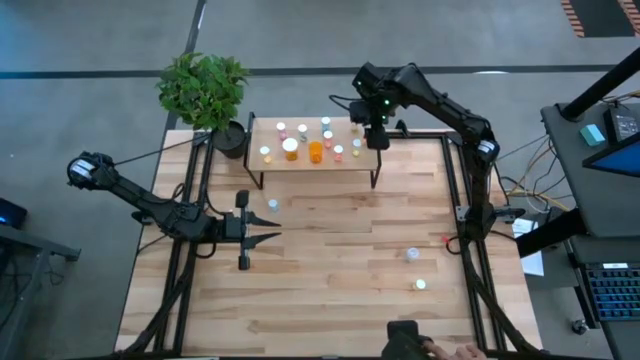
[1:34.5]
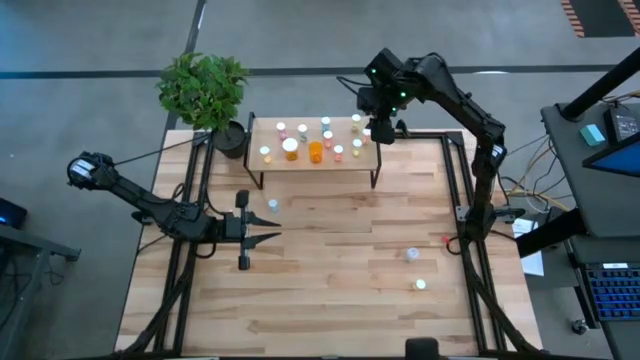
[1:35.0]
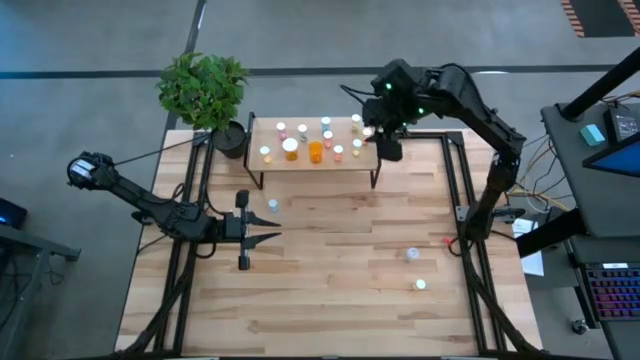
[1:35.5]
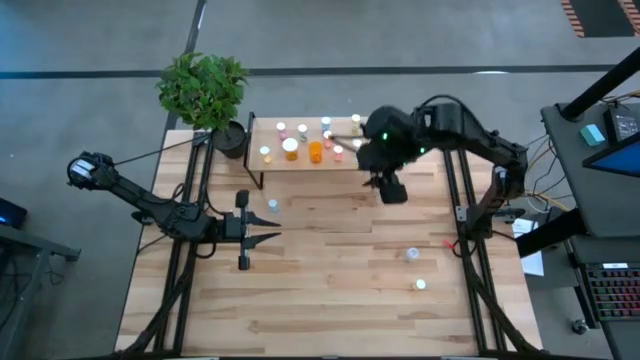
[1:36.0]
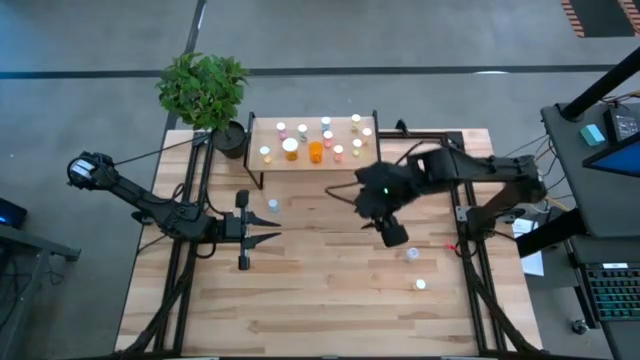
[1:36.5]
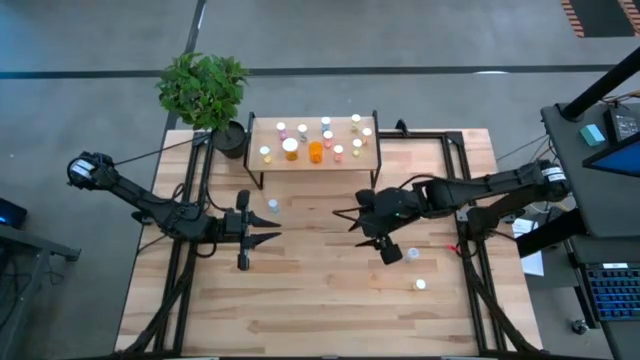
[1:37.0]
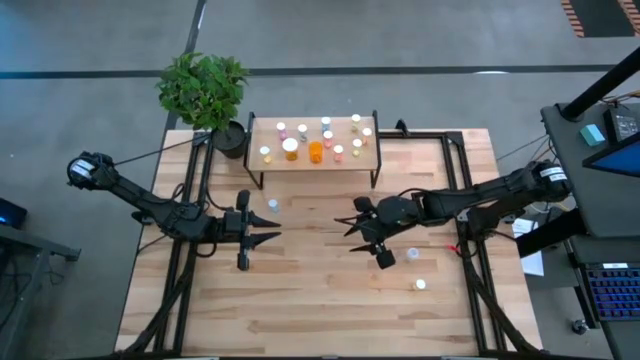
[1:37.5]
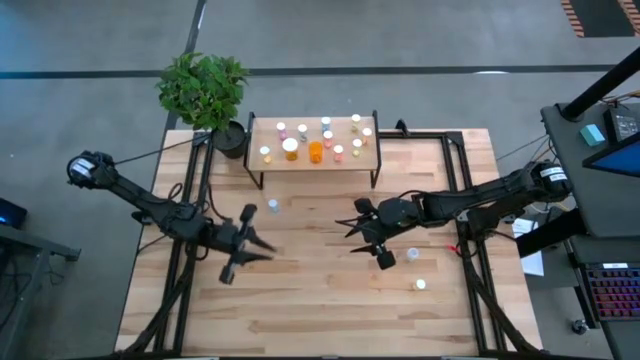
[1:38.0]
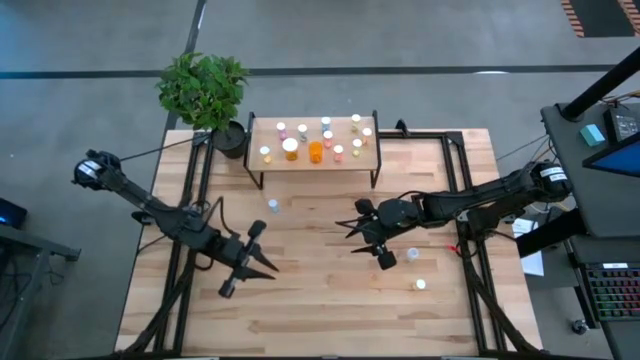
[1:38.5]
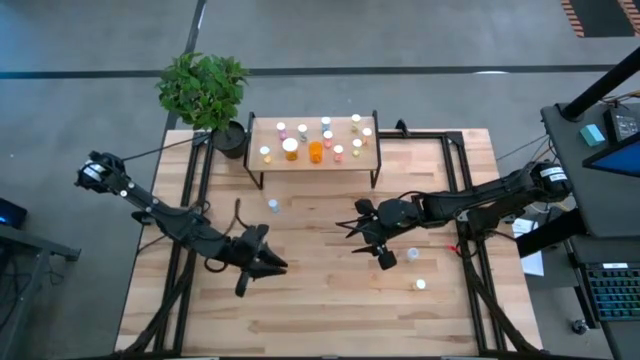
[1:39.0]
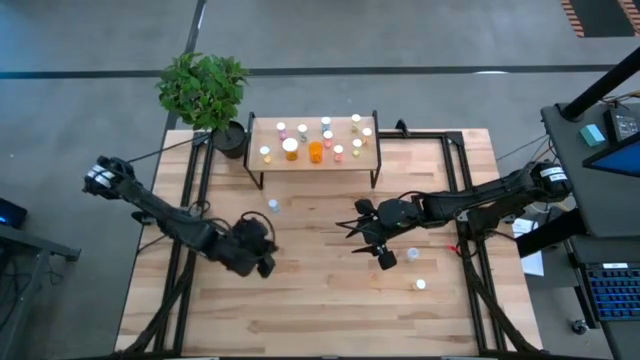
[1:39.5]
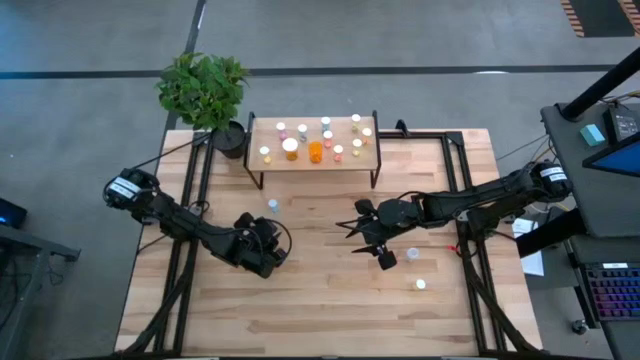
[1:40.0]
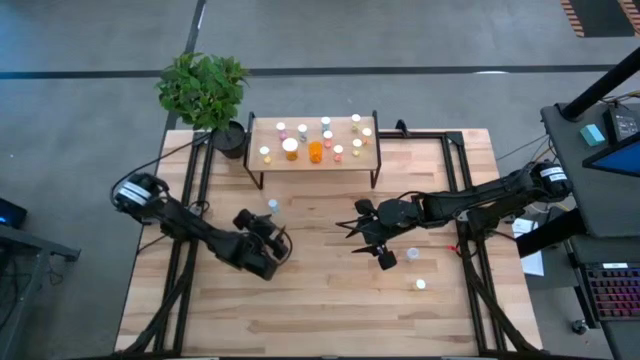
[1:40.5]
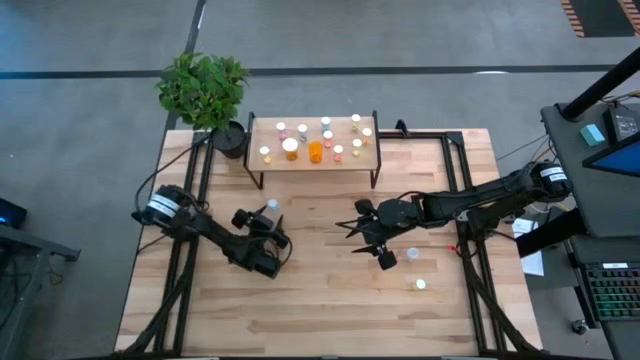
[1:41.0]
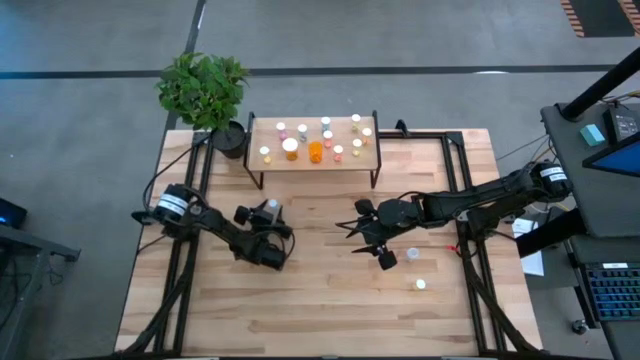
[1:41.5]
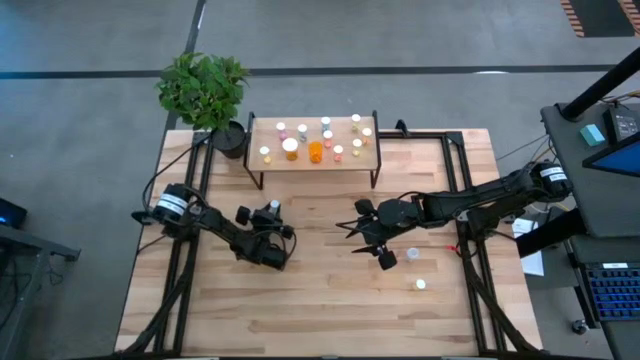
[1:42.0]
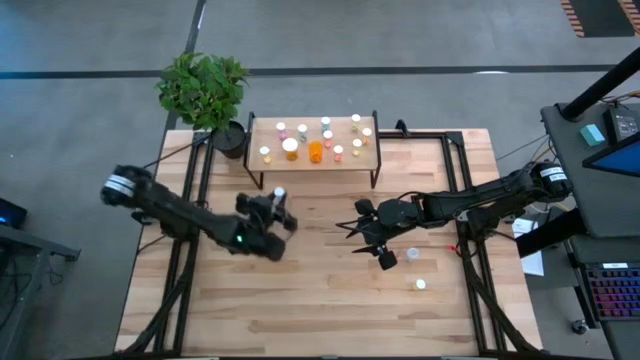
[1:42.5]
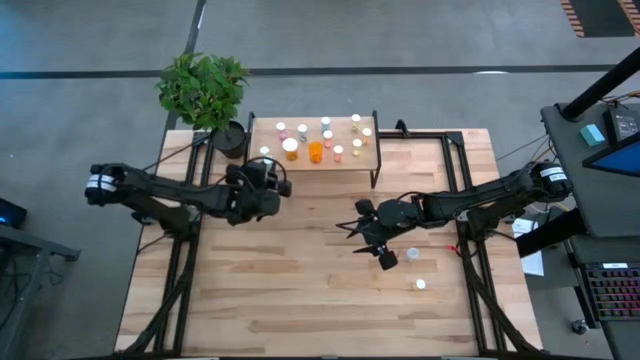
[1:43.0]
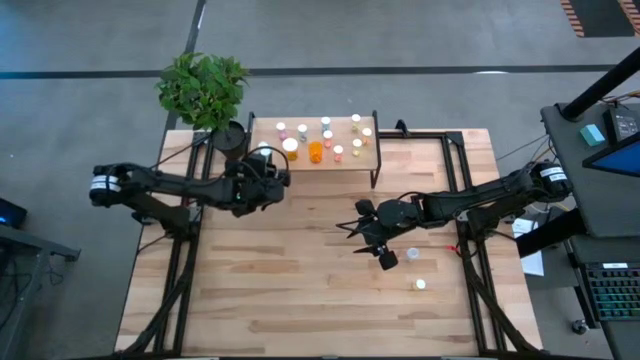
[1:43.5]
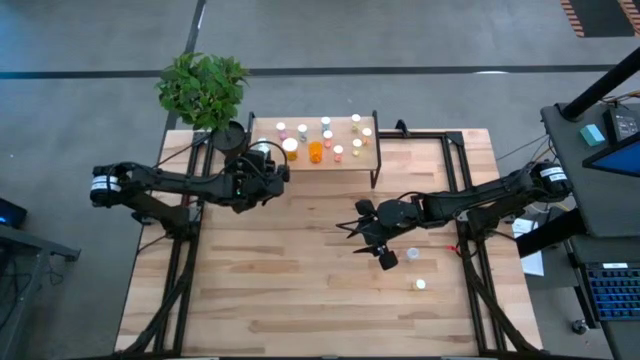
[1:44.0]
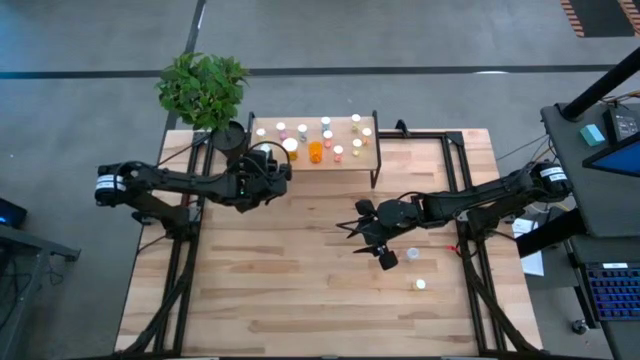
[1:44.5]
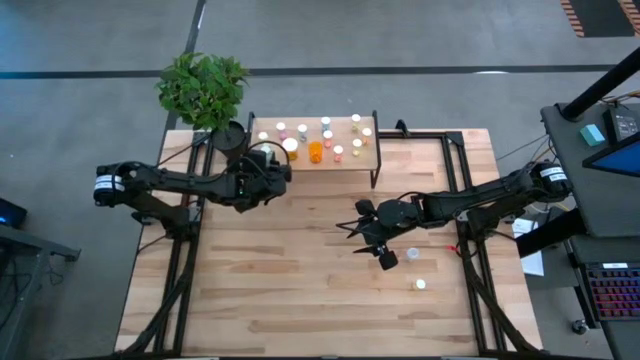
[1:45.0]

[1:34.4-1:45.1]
Task: Pick and place medicine bottles onto shelf by color
Put the blue pill bottle on the shelf

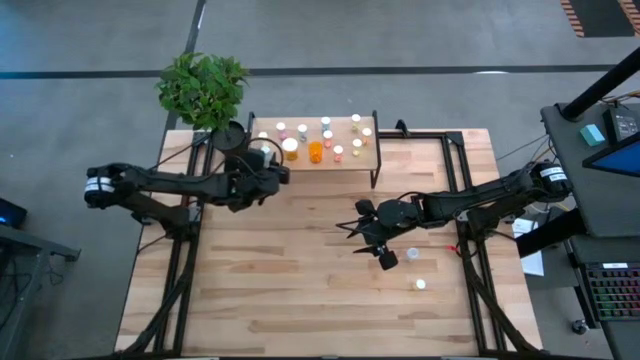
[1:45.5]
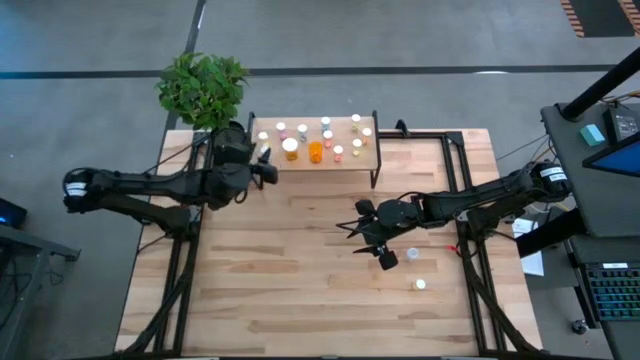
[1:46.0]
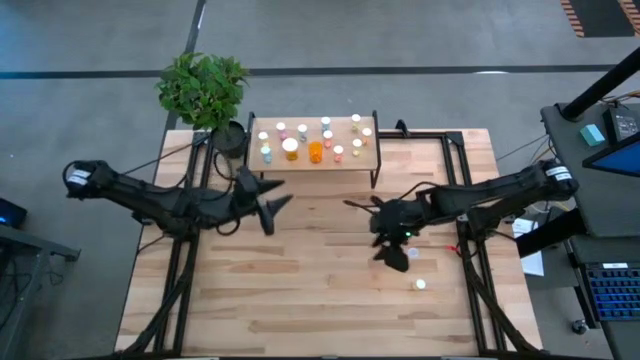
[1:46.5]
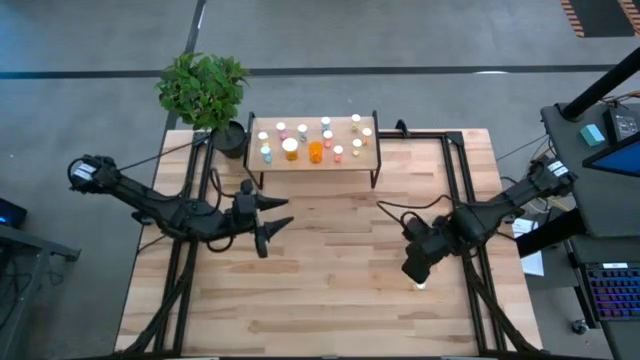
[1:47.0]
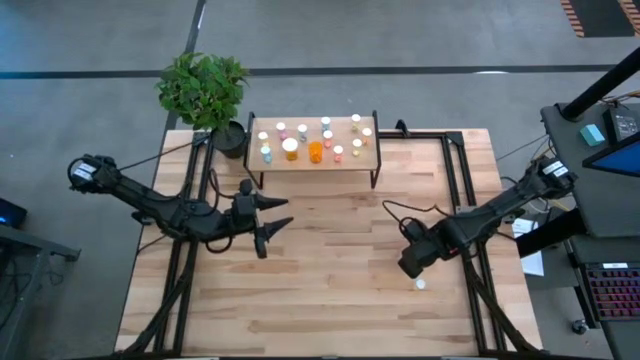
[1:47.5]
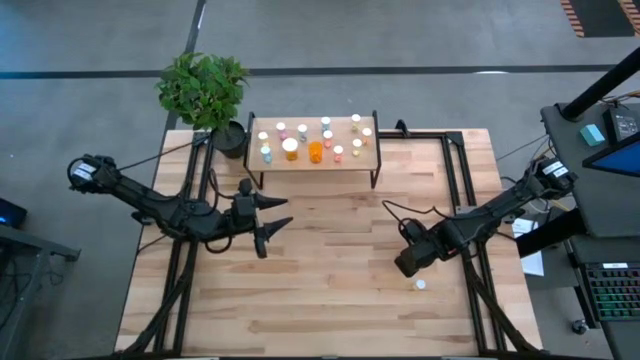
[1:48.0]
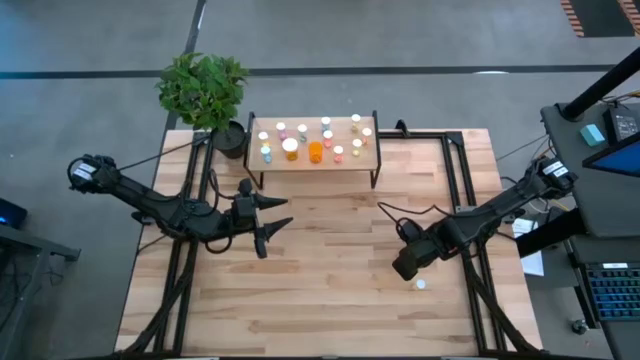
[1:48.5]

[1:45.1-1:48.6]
Put the transparent pill bottle on the shelf

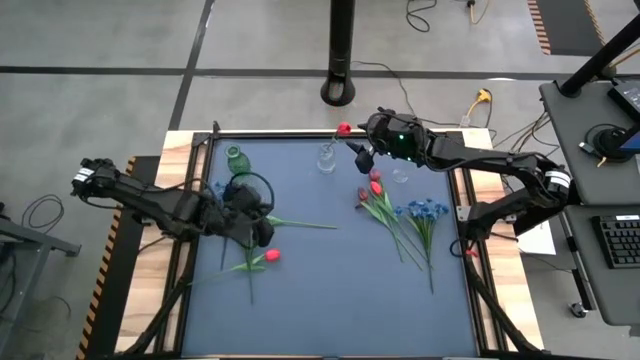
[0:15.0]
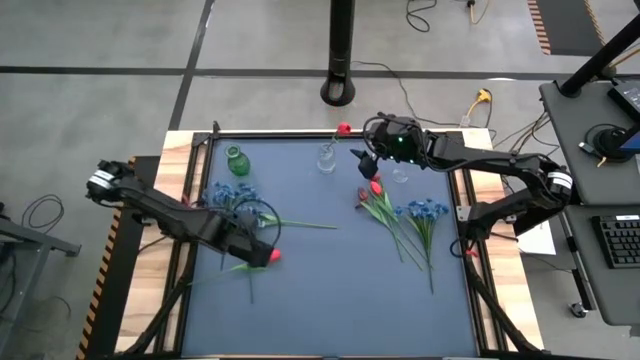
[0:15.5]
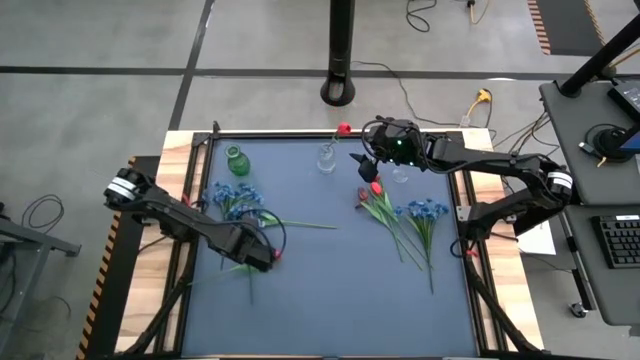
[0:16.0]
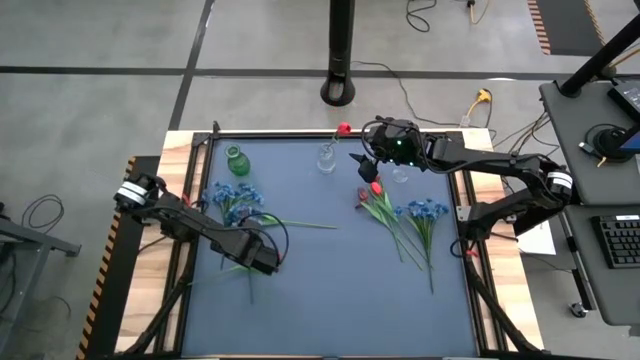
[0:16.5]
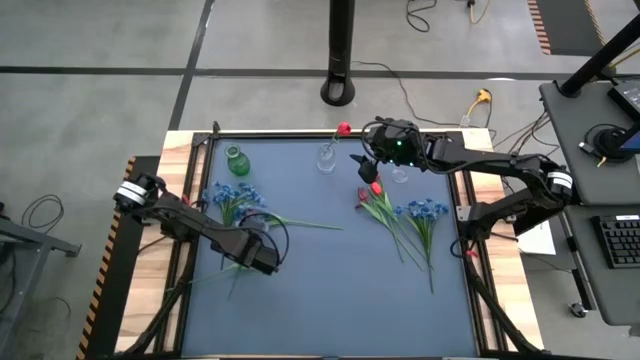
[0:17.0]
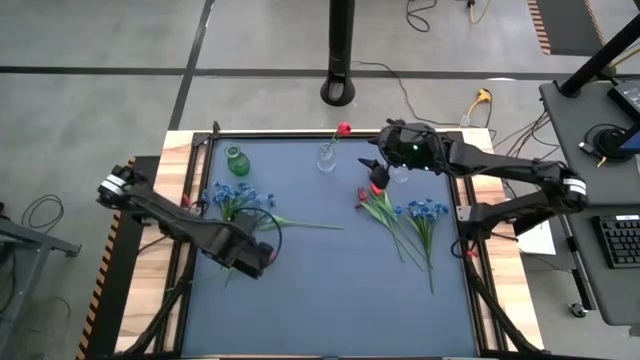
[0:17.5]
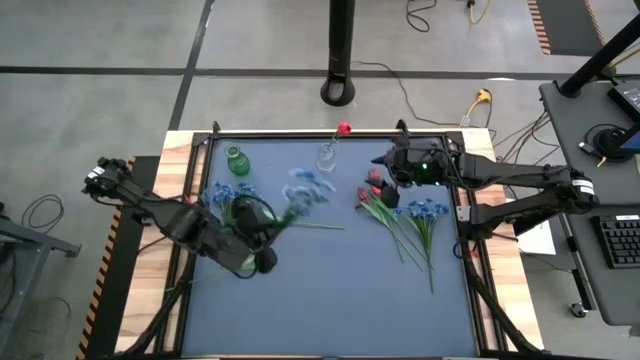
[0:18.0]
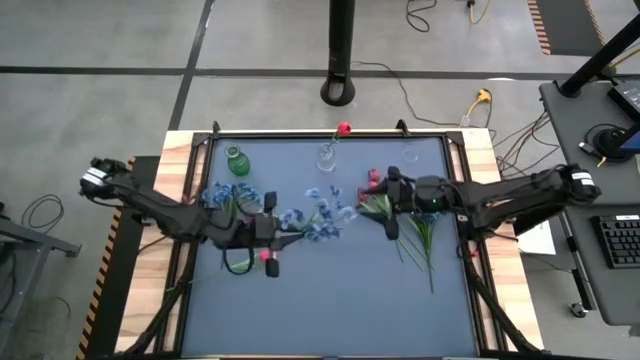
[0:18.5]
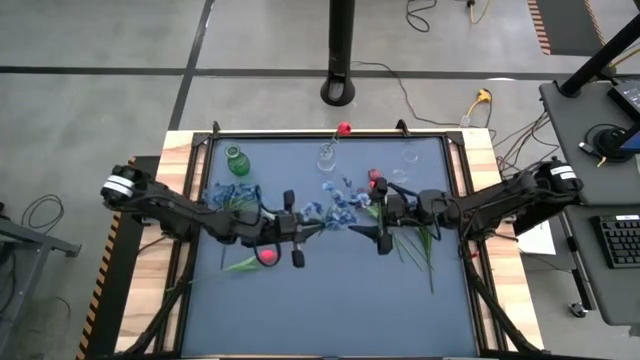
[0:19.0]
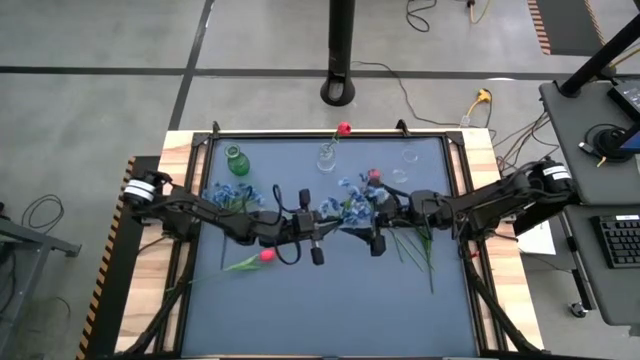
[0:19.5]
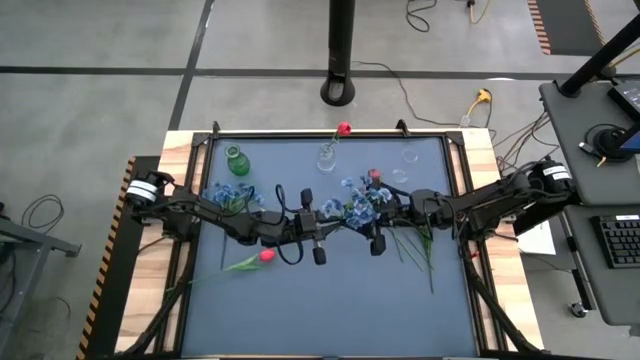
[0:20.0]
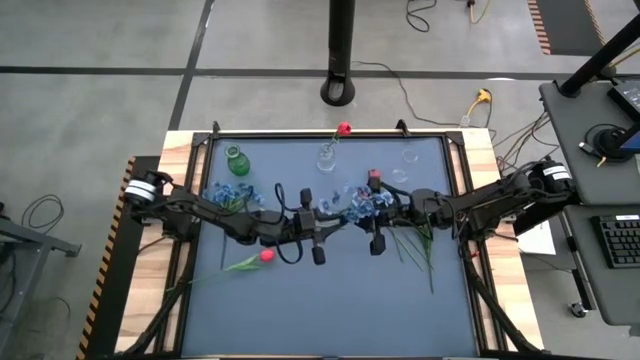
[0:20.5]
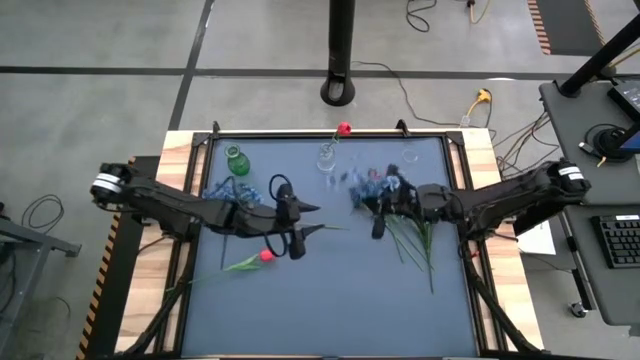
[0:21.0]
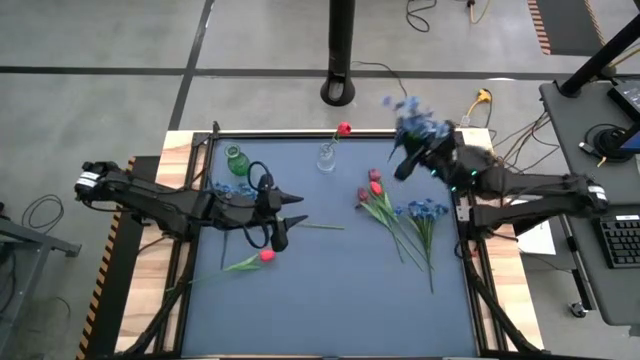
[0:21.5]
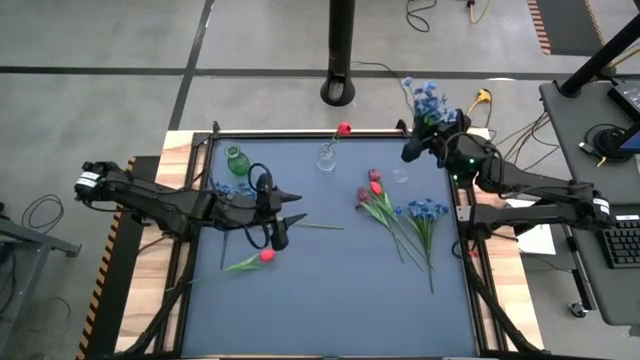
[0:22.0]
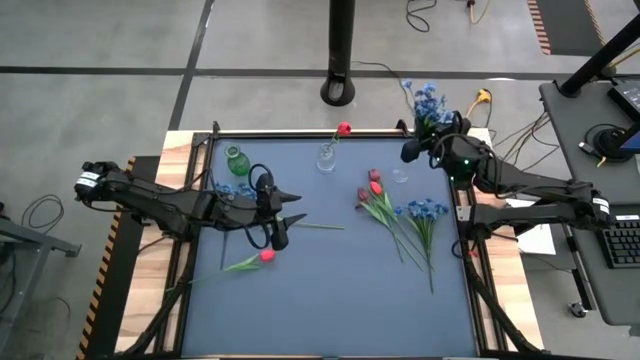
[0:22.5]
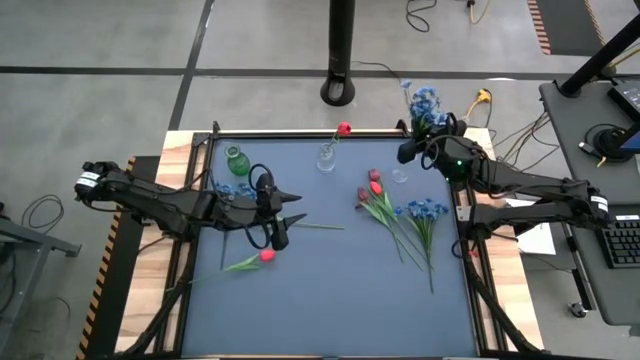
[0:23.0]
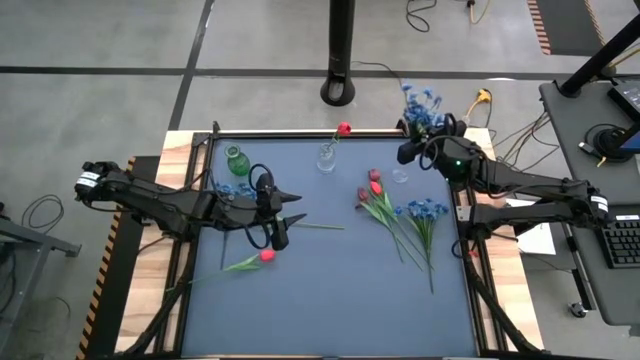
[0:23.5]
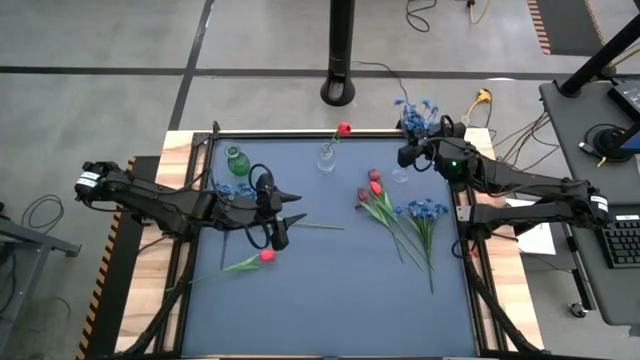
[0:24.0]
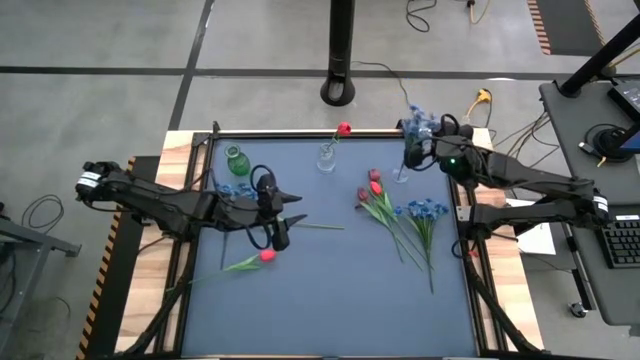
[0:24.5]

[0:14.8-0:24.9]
Task: Sort flowers into vase by color
Put the bottom left blue flowers into the right transparent vase
